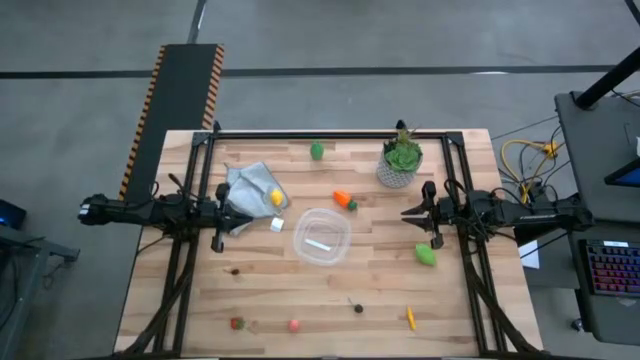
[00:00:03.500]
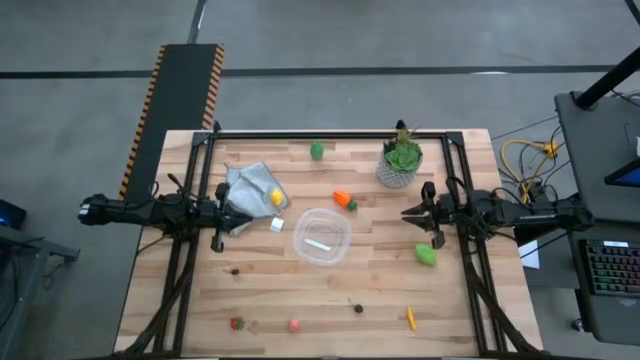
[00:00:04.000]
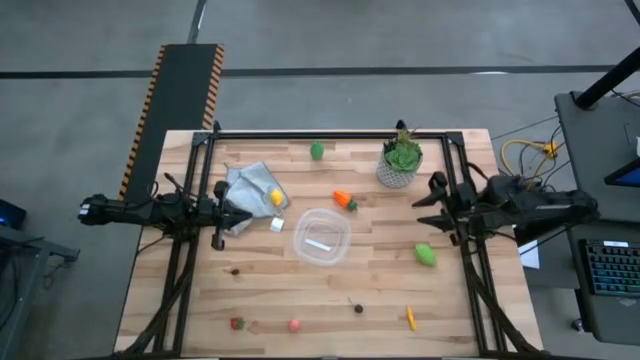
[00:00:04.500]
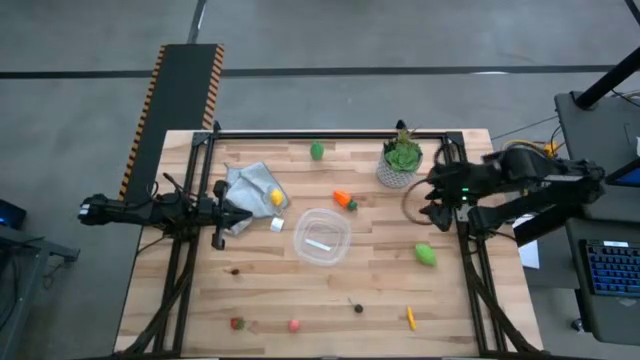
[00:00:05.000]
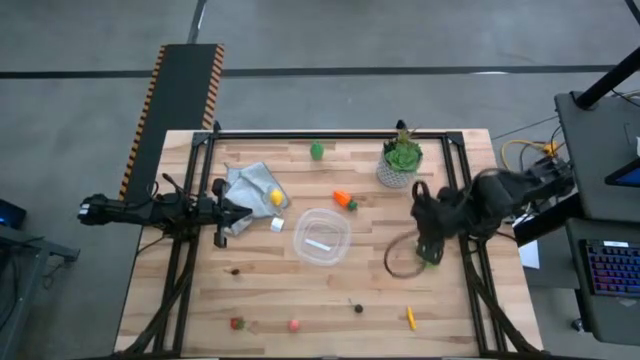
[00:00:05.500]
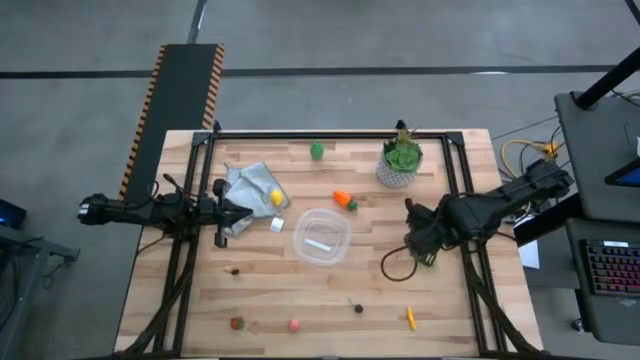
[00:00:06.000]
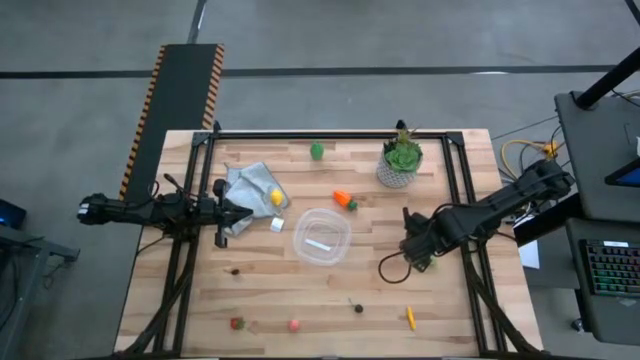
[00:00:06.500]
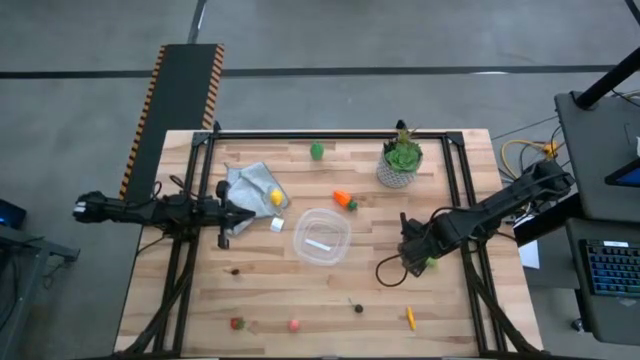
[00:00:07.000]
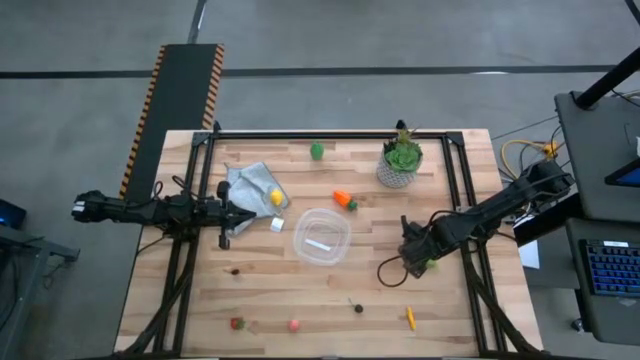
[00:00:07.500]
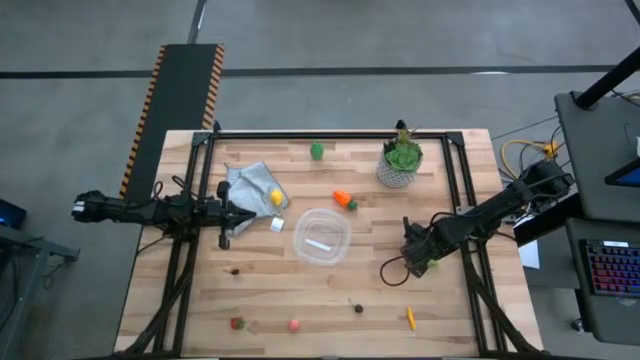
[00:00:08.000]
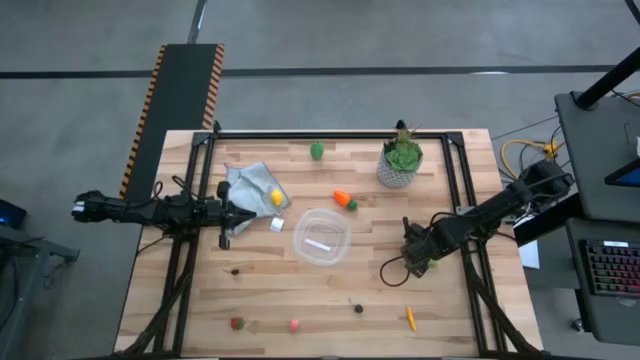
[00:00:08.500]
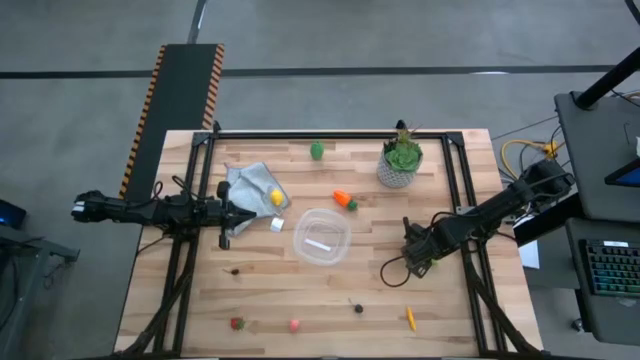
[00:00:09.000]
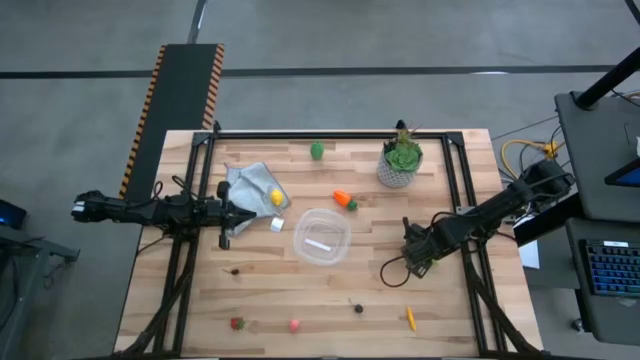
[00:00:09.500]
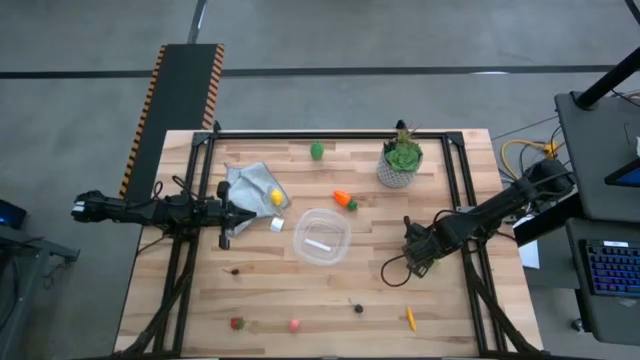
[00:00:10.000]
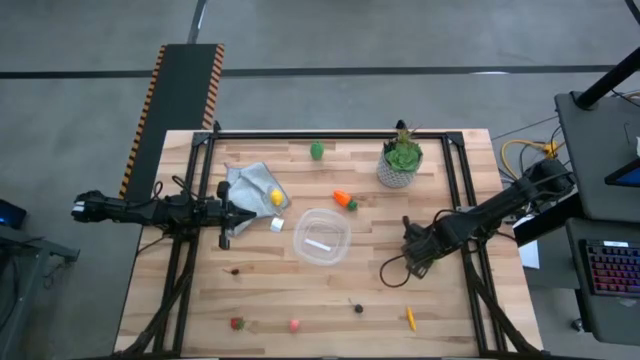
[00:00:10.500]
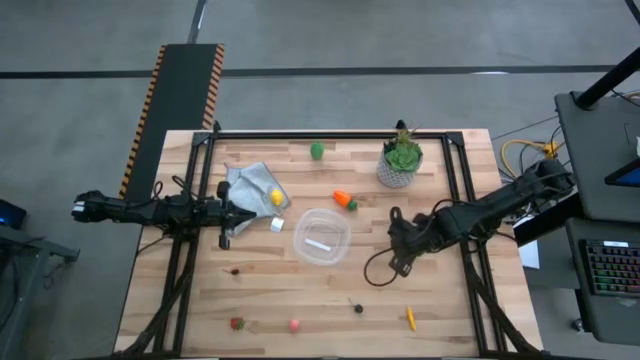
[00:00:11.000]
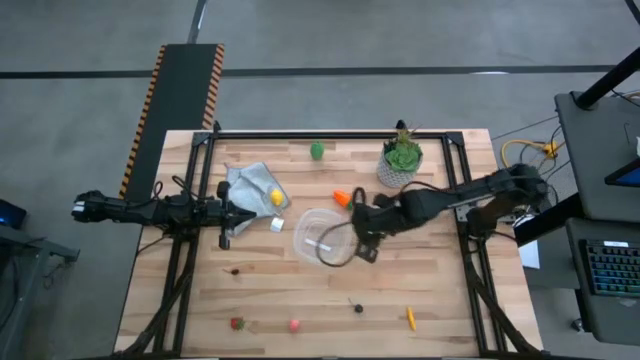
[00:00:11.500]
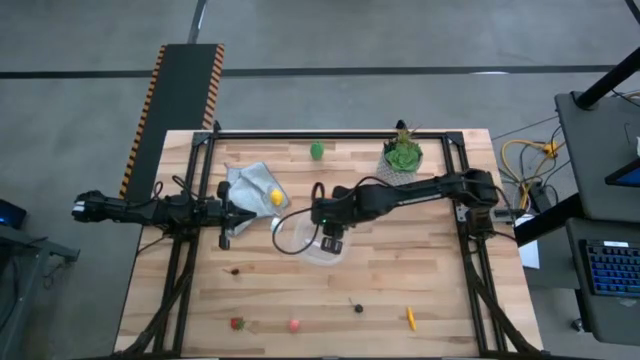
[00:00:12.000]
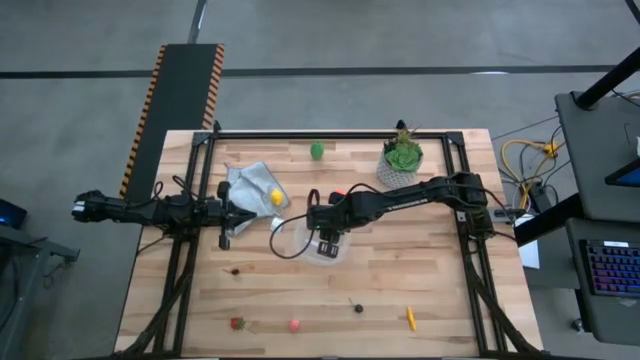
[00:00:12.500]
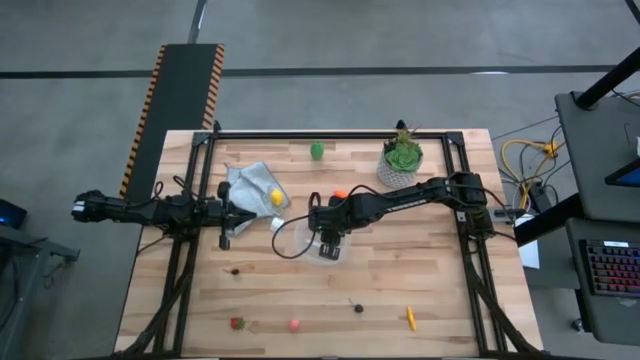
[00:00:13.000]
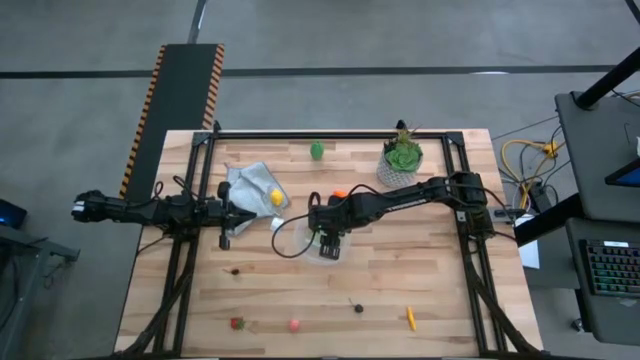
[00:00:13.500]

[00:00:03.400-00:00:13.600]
Task: Pick and placing Produce into tupperware
Put the green melon into the transparent bin

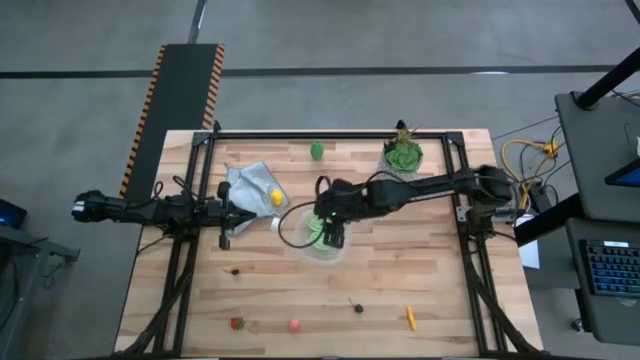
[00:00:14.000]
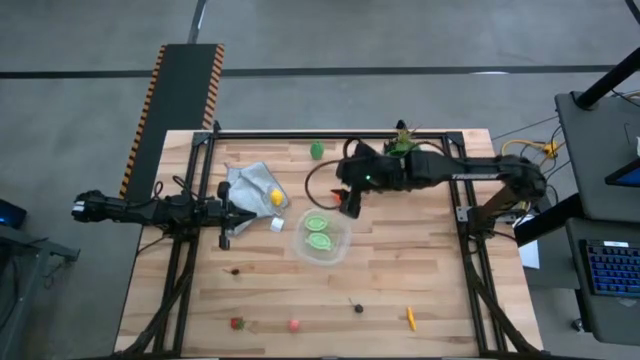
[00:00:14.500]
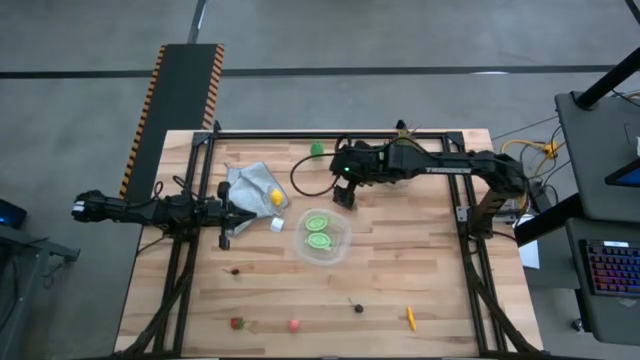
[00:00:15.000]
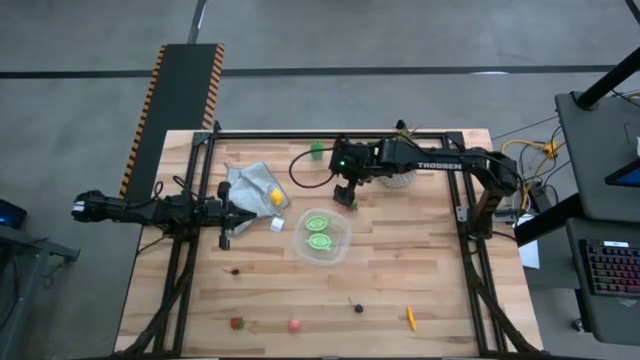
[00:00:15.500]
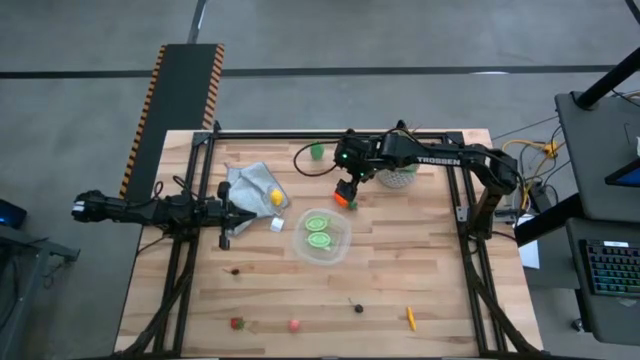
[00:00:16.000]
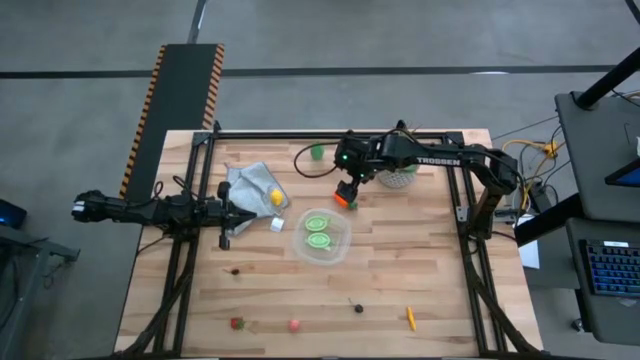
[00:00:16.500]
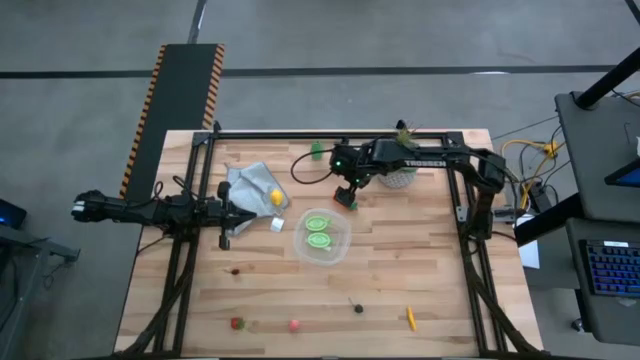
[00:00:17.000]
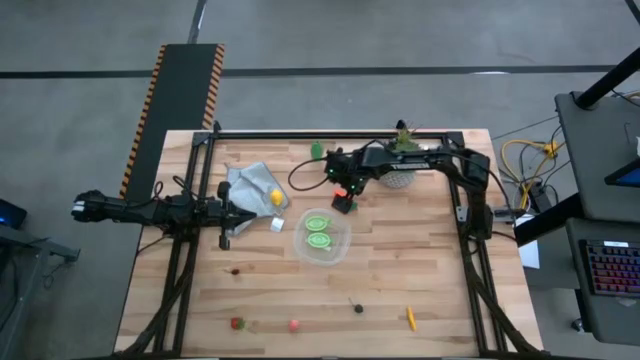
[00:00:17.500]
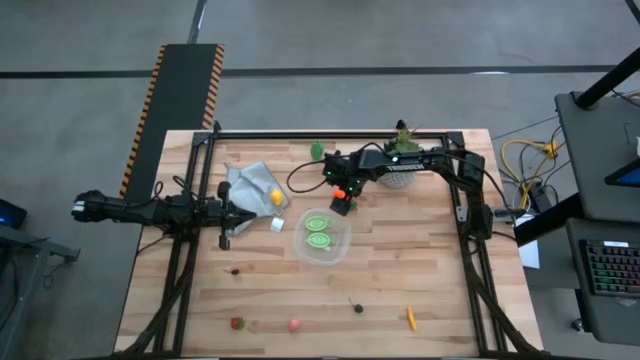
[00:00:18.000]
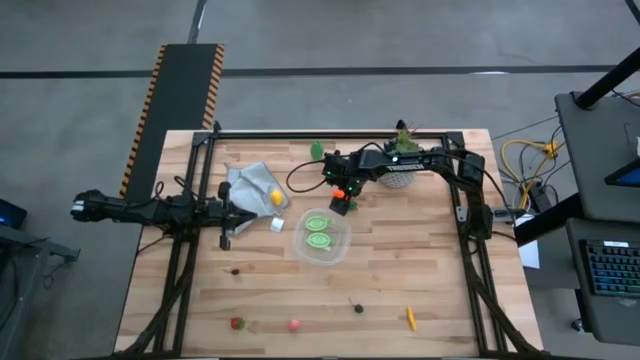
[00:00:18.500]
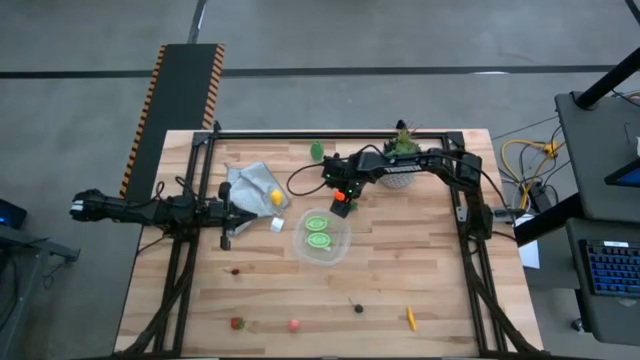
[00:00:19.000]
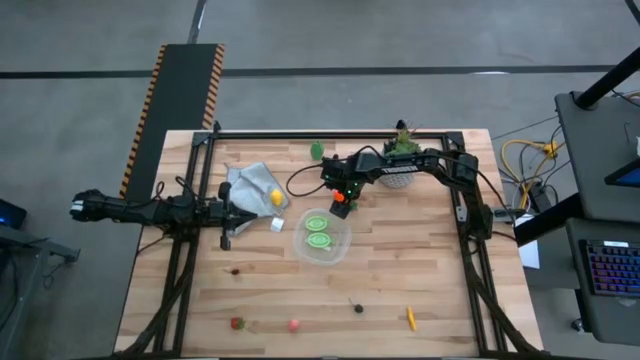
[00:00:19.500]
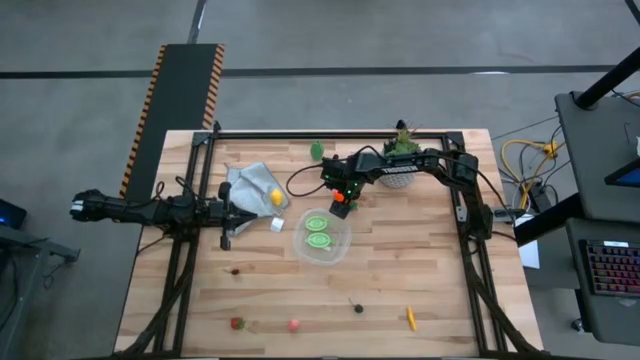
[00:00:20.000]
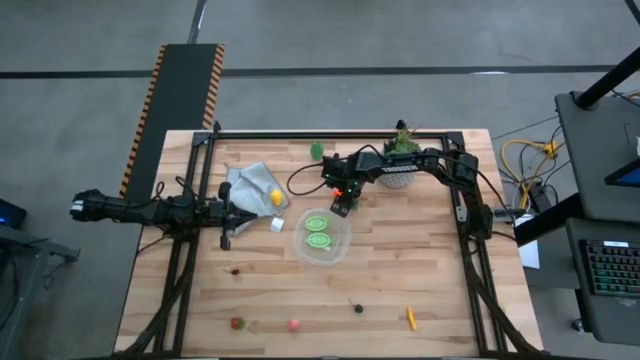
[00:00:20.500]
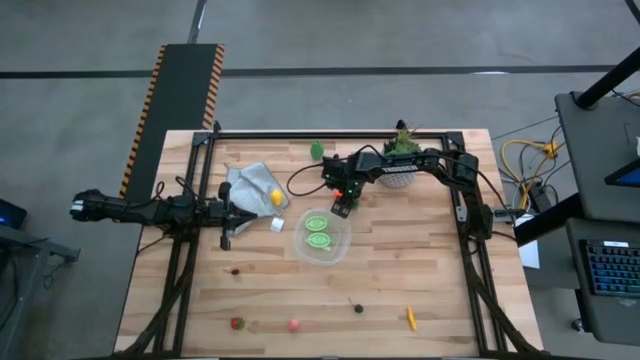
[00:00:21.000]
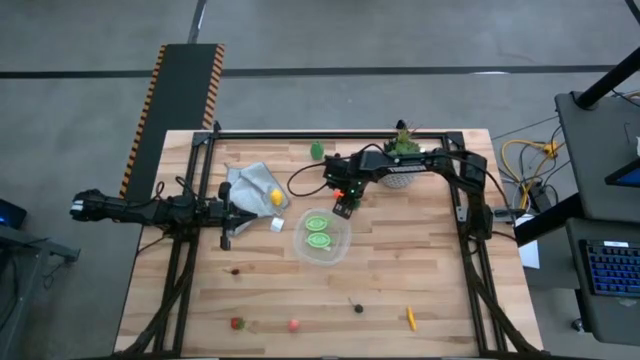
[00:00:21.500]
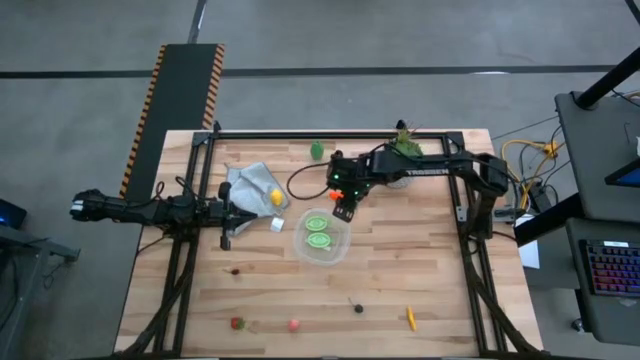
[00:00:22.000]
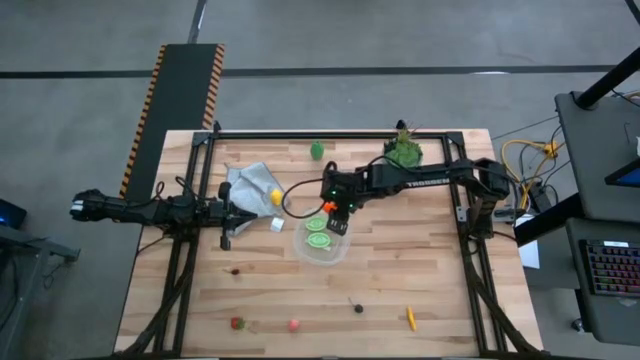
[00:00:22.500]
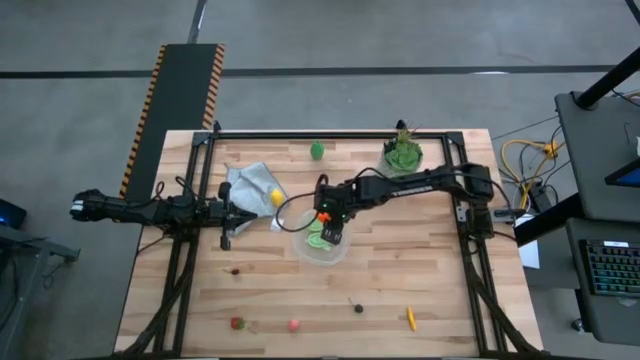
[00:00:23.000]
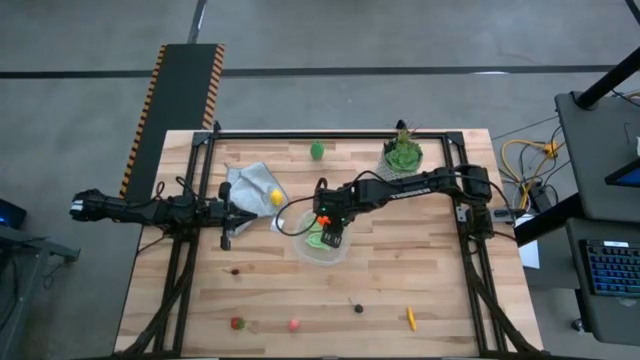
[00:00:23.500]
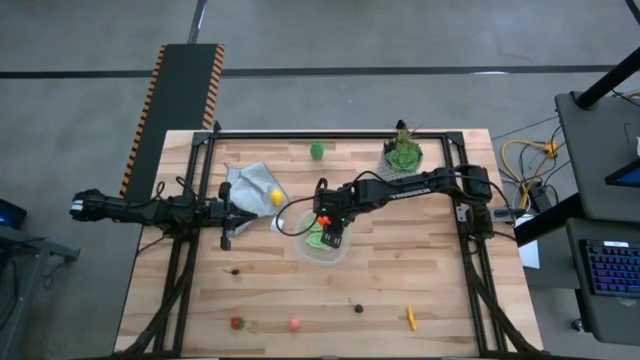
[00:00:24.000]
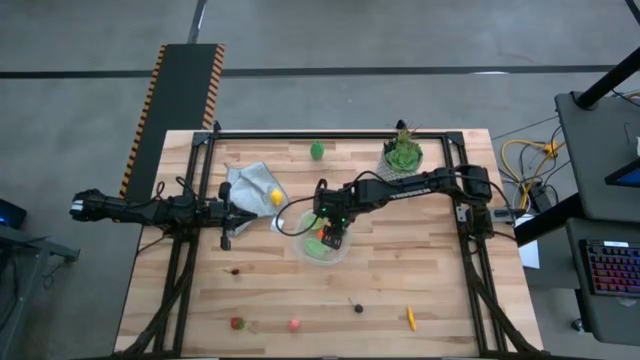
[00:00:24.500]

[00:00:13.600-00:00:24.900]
Put the orange carrot into the transparent bin
